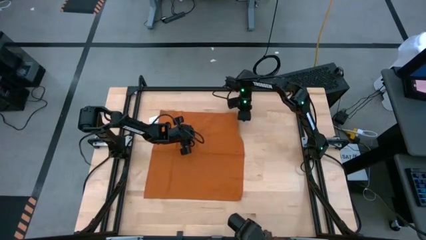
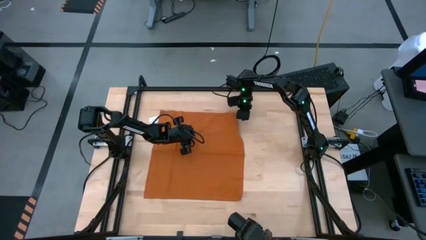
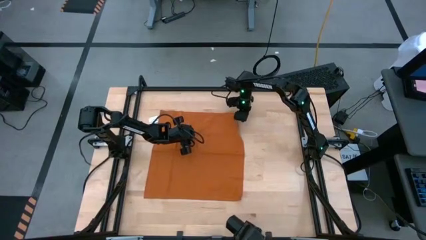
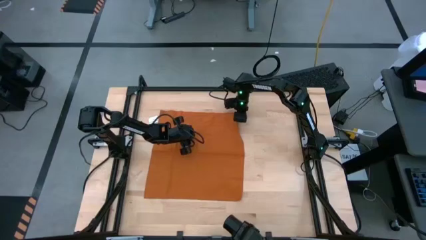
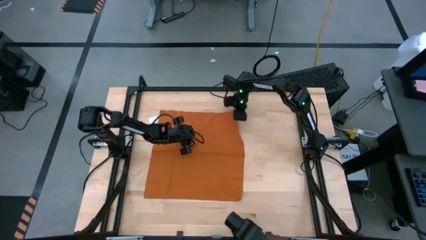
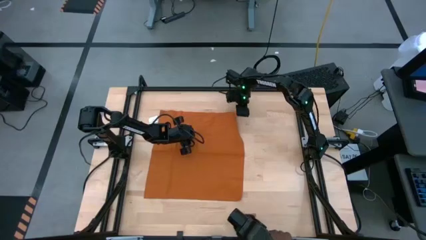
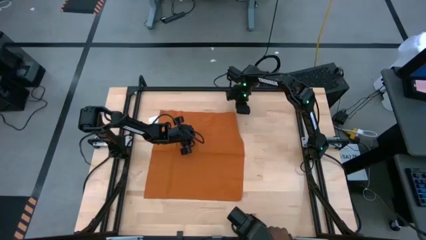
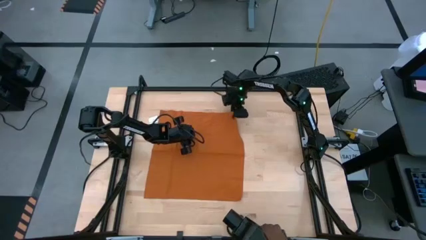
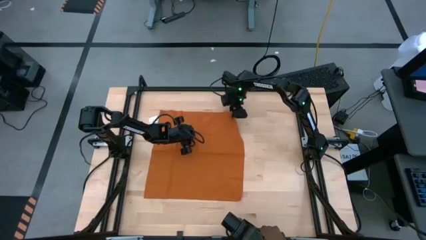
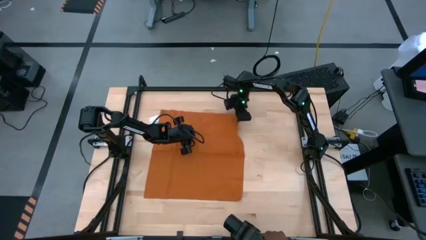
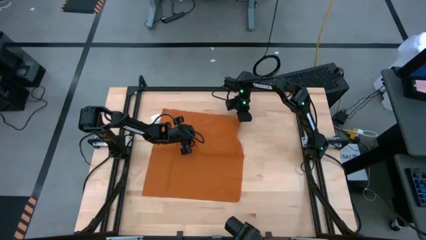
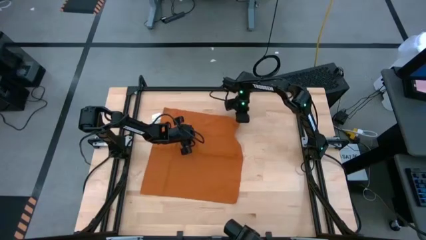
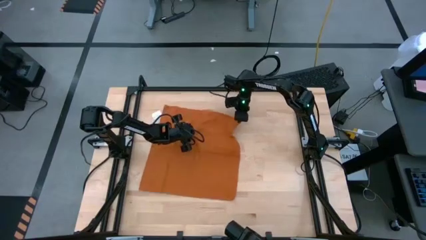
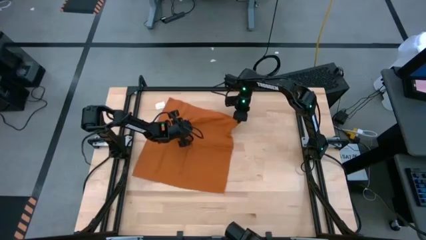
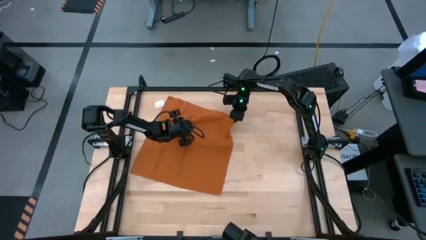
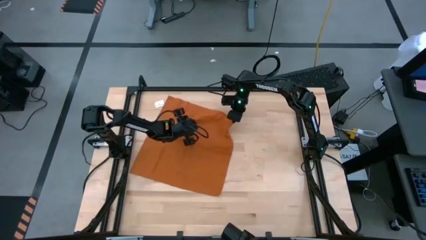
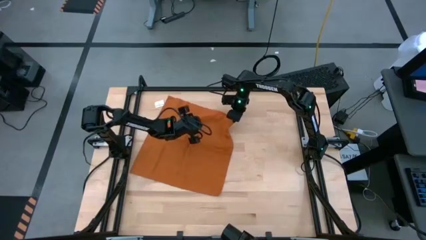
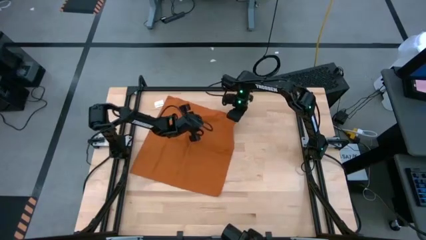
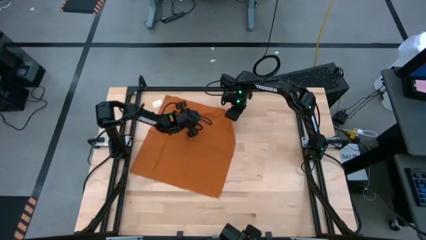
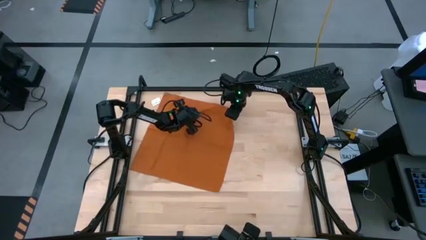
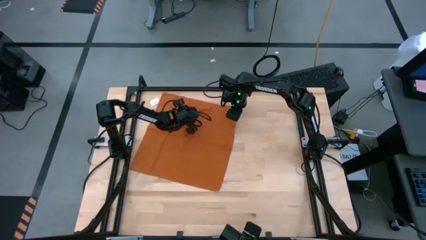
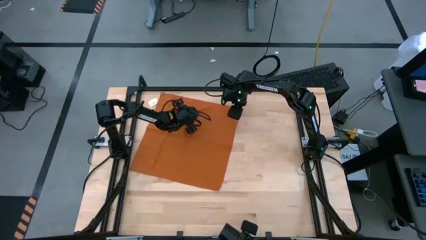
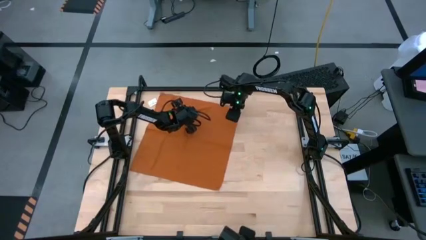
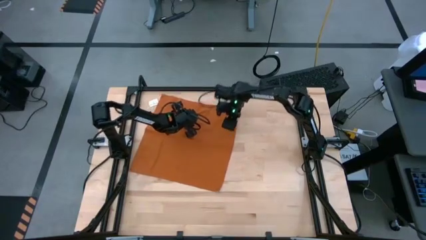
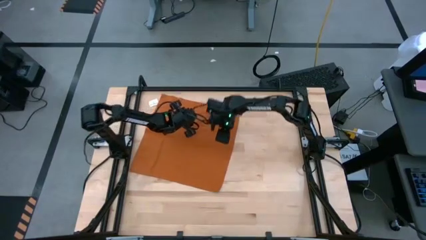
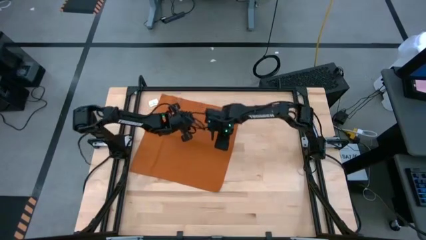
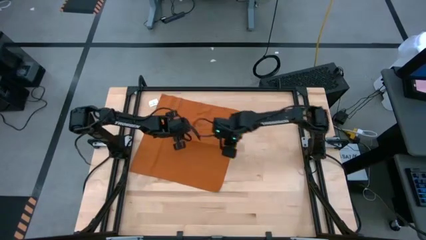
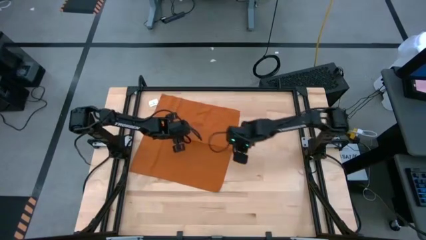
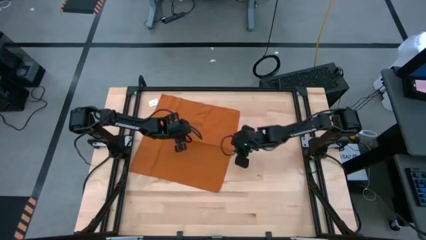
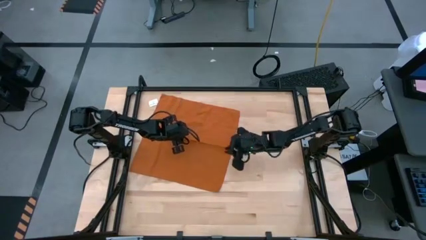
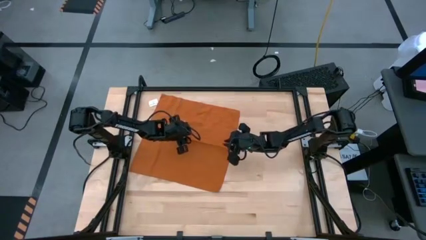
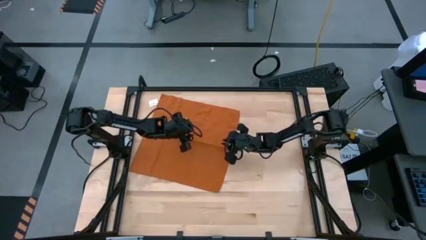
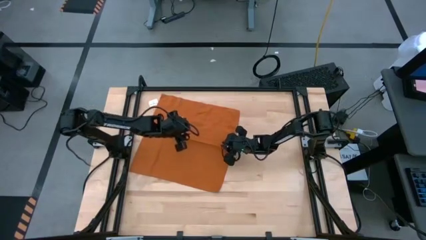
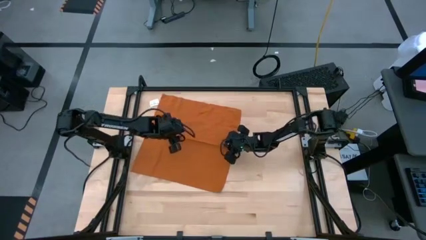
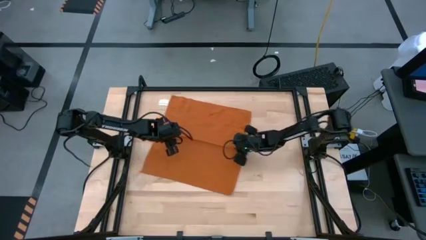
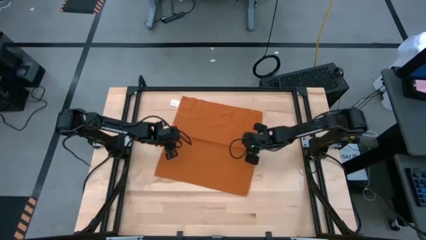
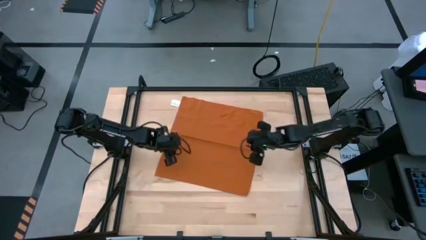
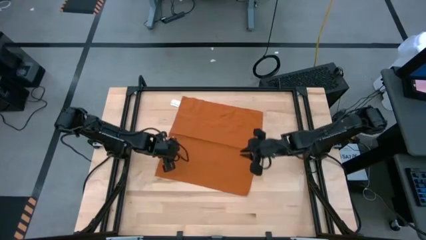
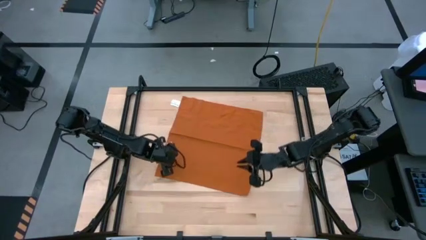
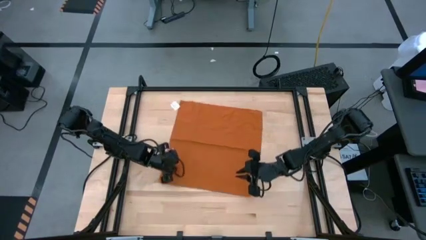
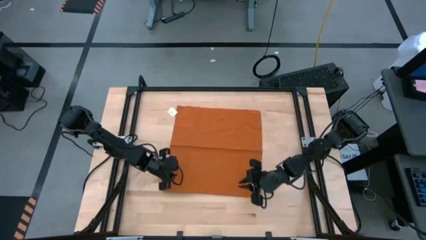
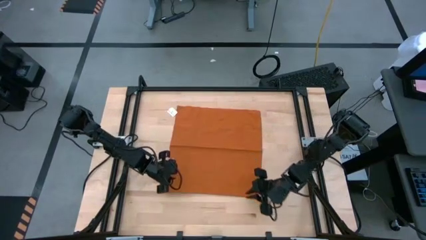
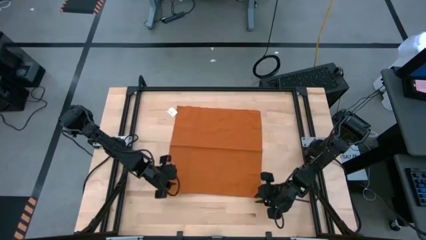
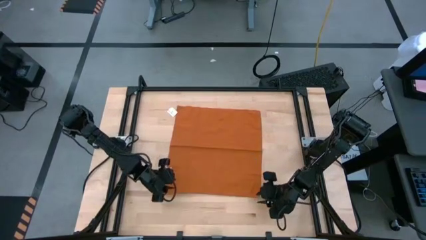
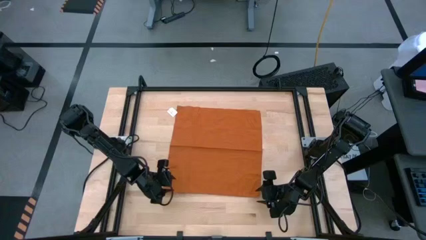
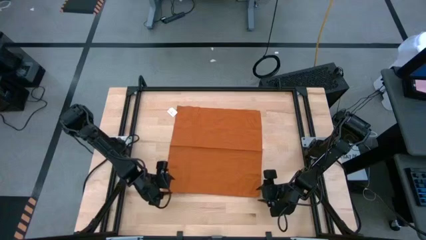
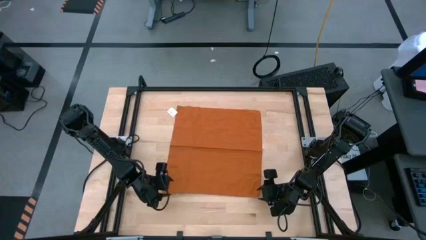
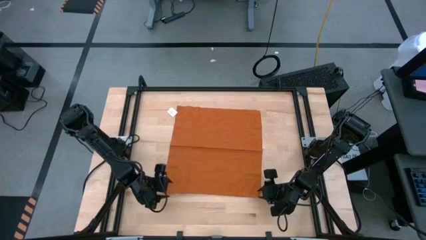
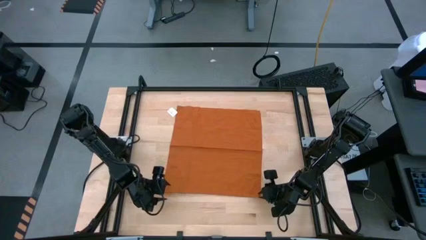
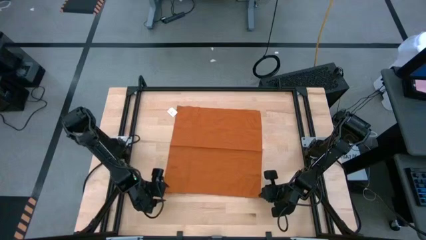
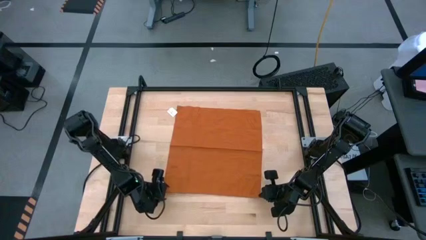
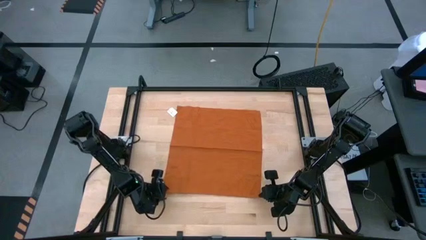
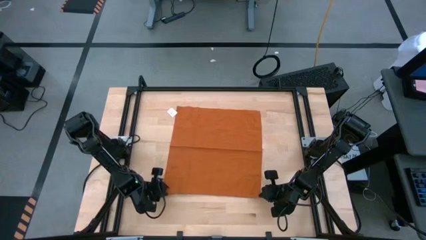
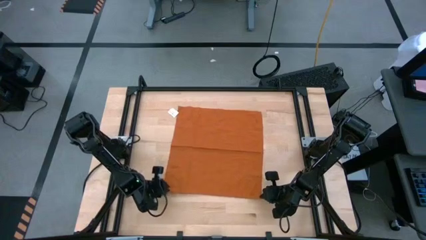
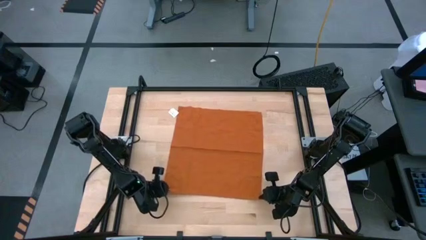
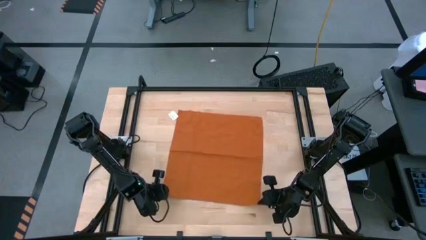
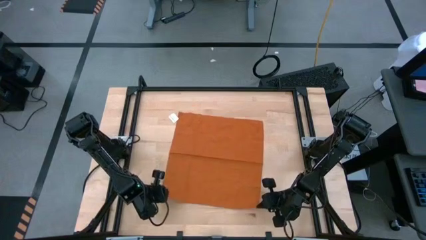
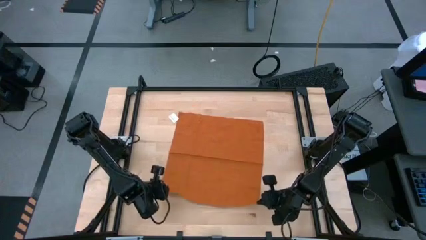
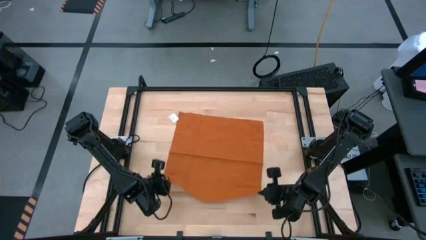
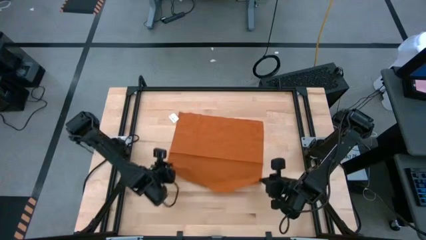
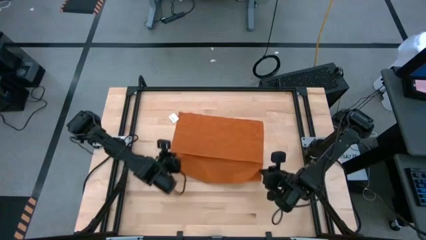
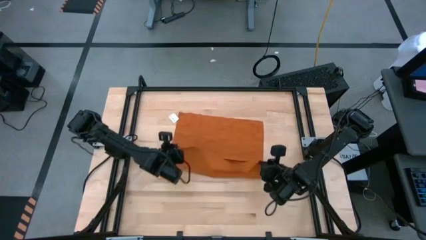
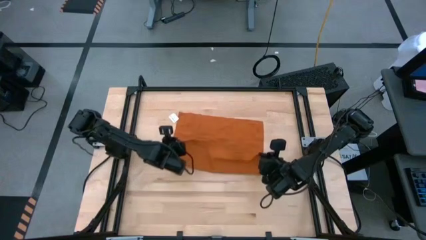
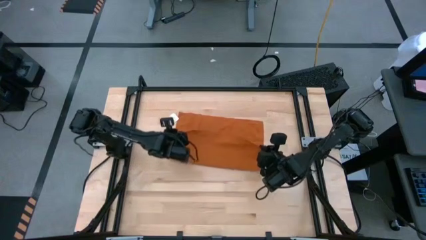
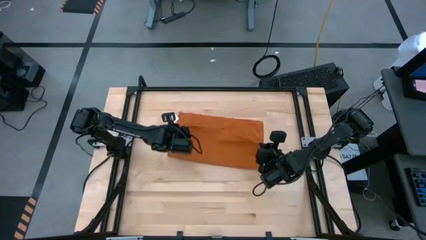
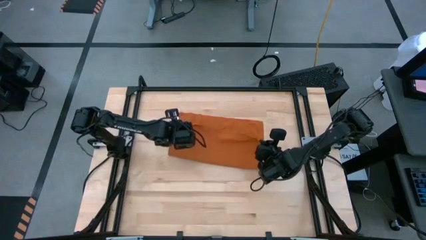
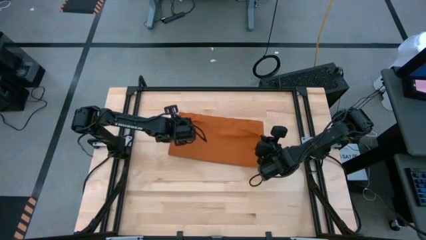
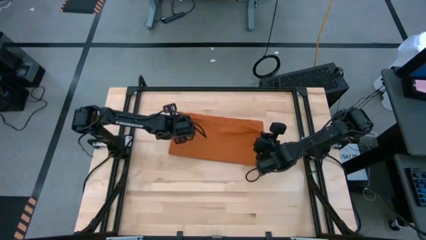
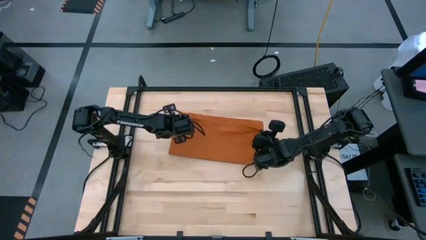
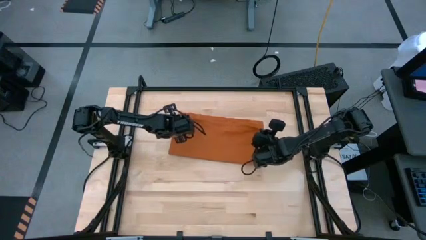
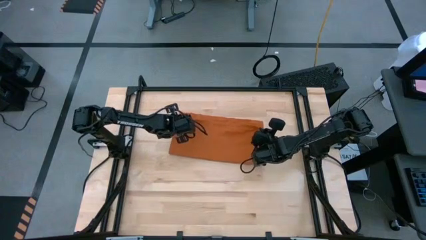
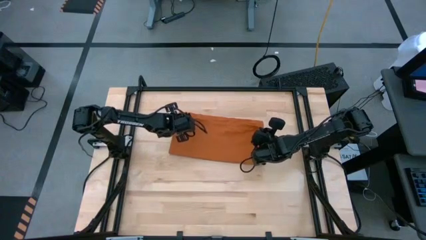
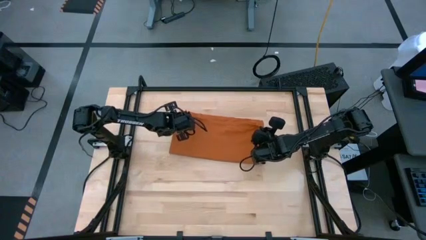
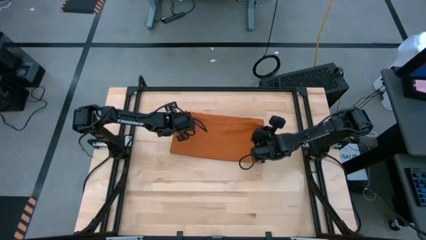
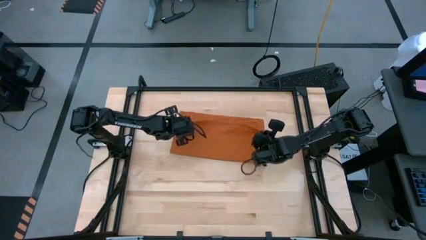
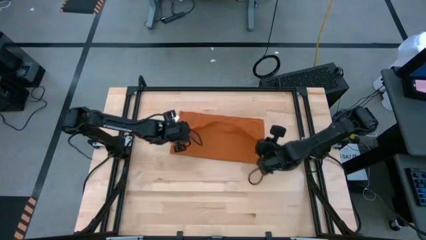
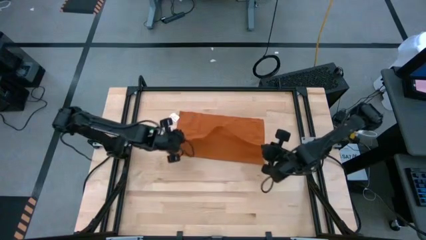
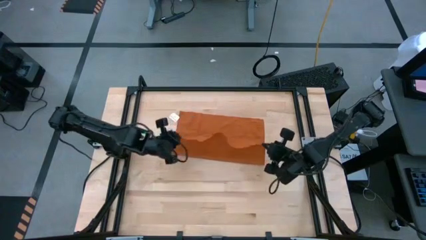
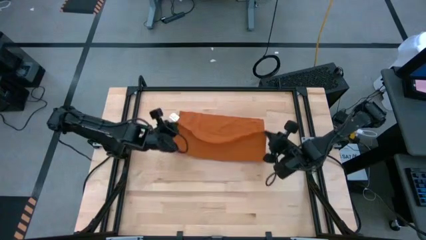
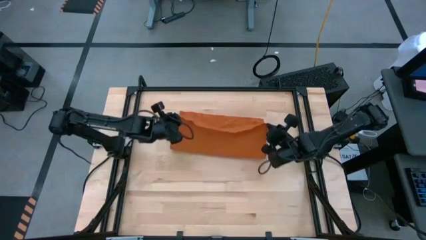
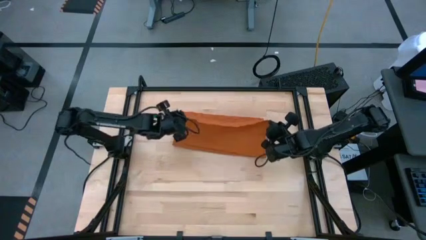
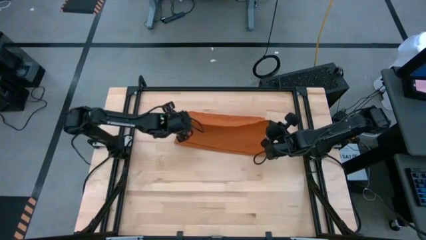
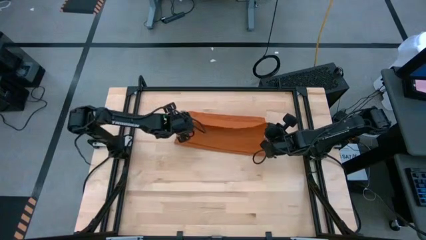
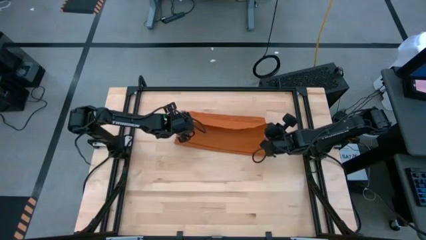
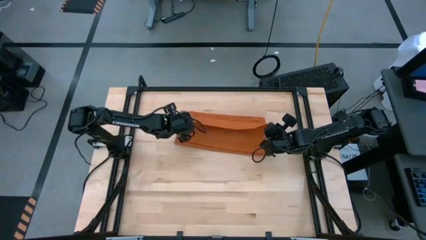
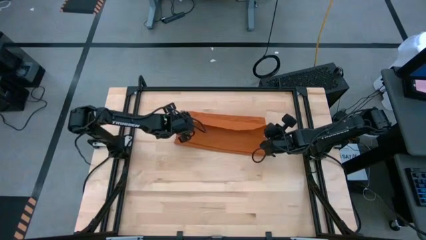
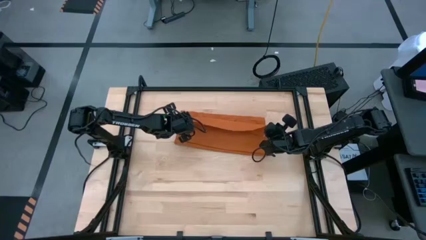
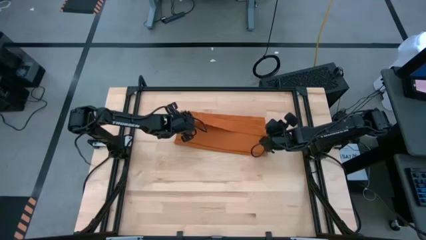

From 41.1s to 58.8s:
Task: Roll towel
Roll the brown towel
